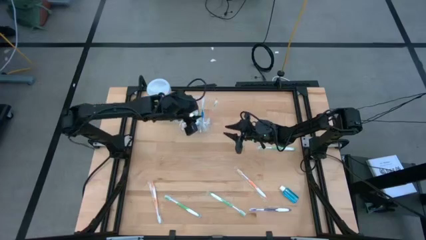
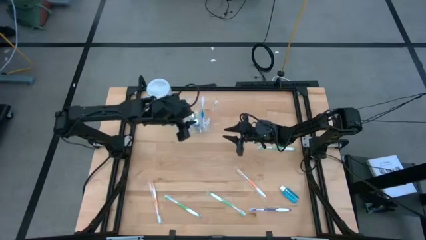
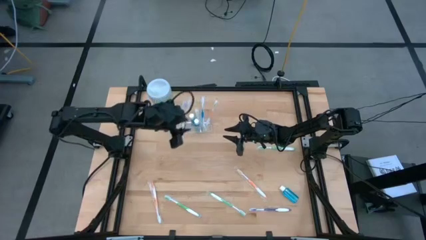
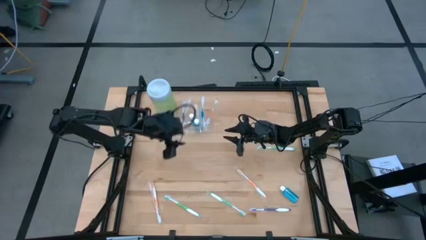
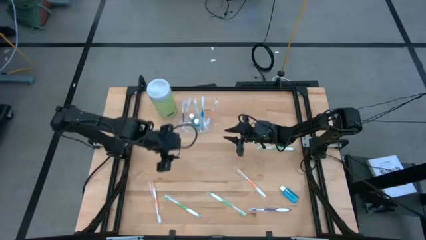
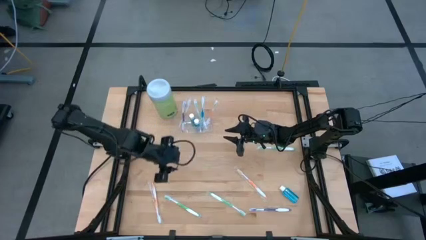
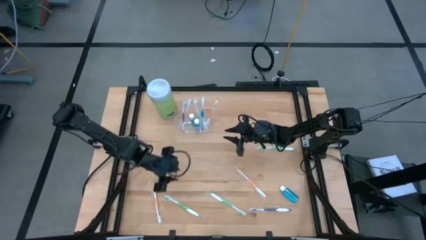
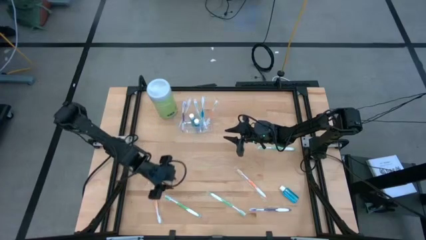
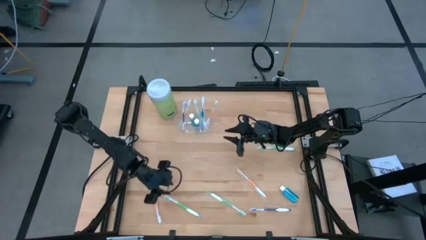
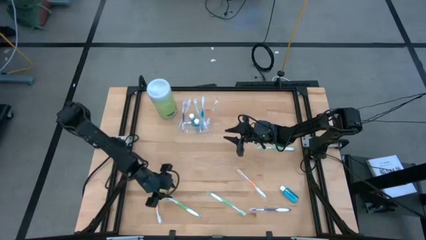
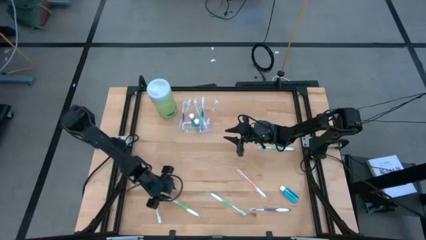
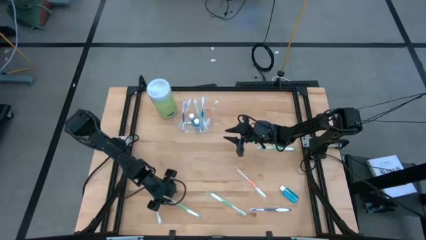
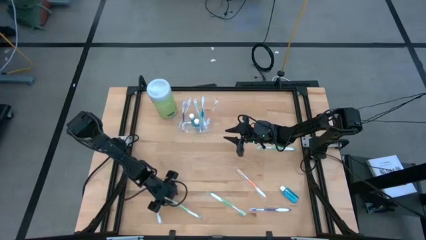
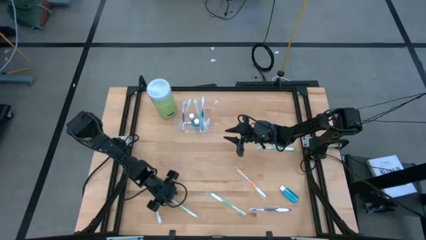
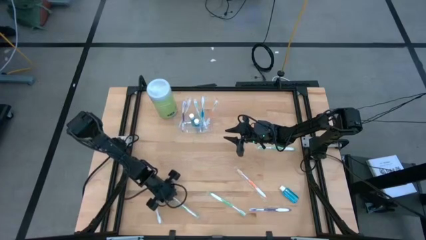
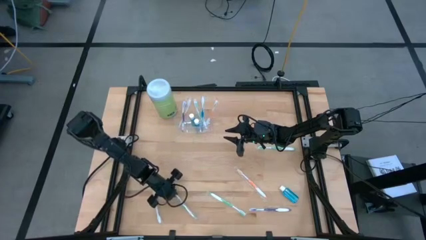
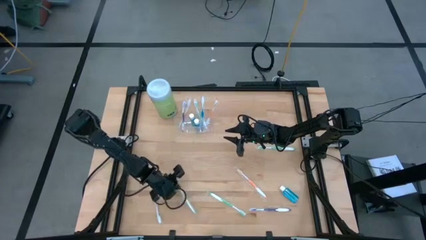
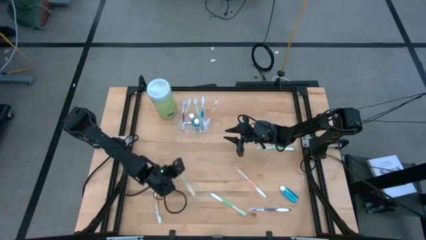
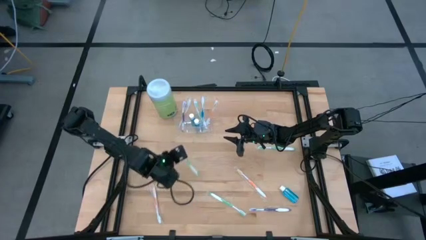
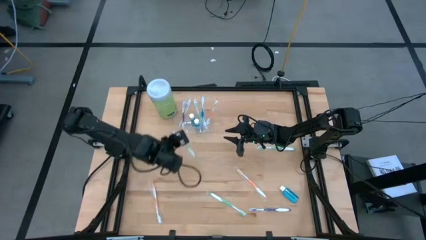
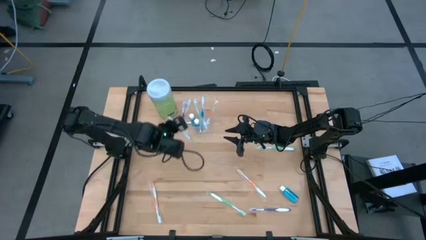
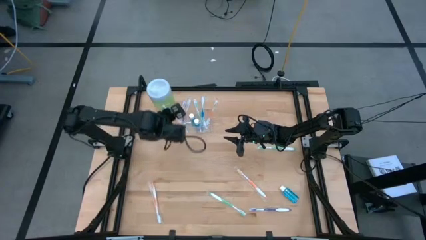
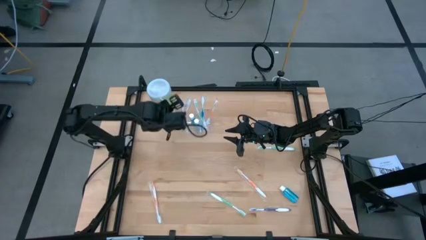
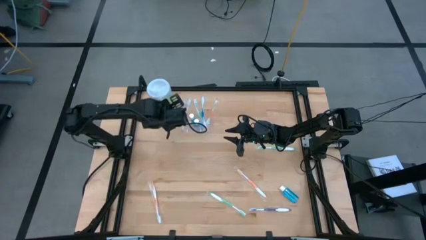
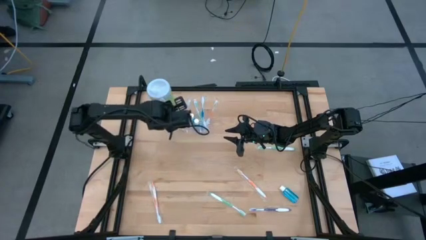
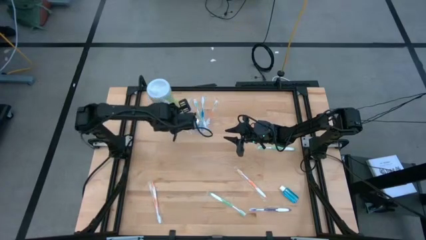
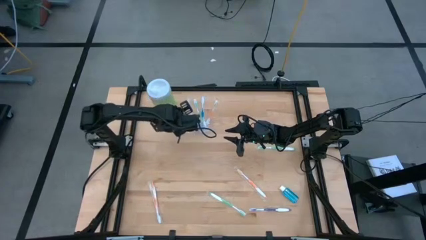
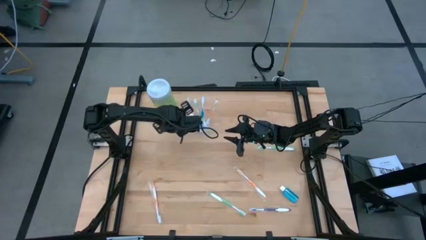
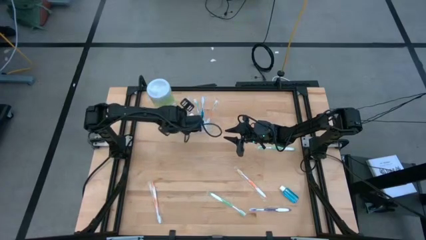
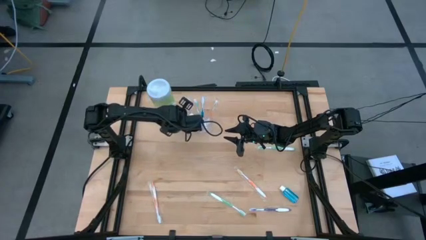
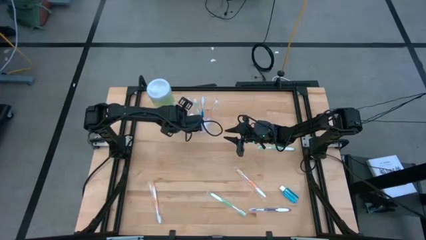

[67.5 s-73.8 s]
Task: Pick & Place toothbrushing station
Put the green toothbrush into the transparent organizer

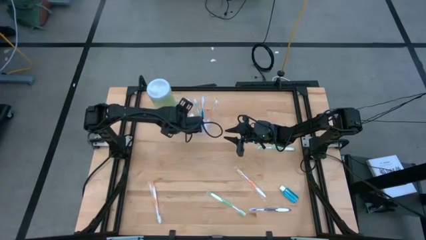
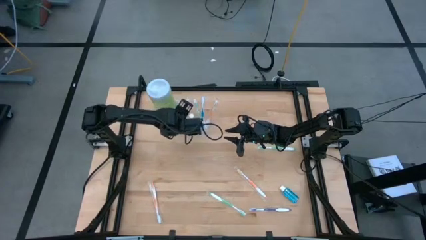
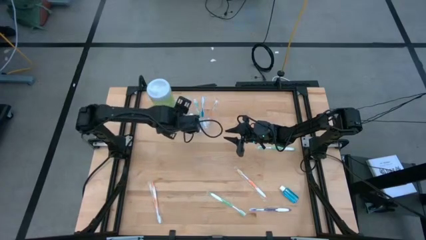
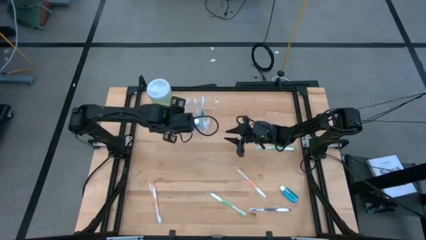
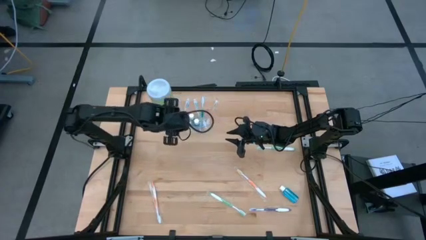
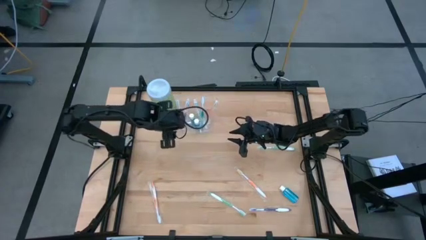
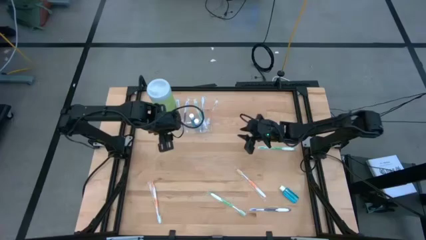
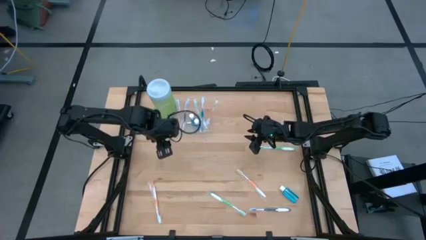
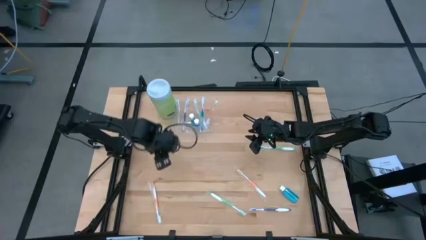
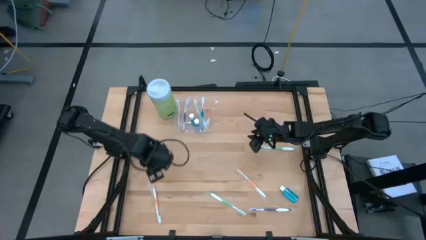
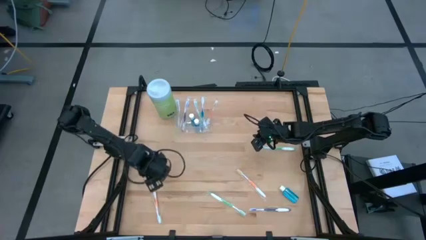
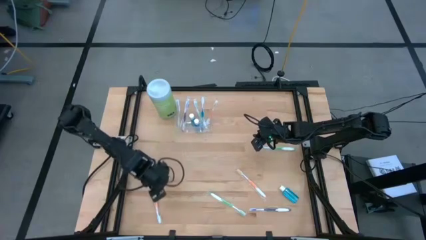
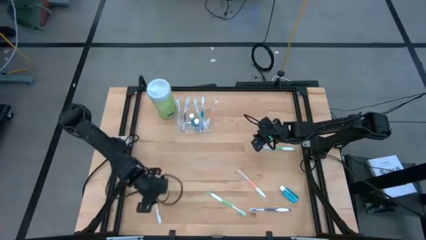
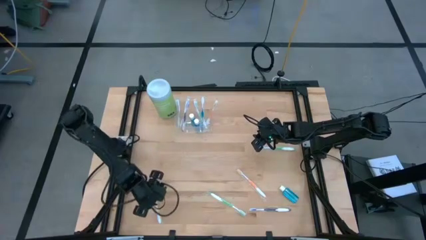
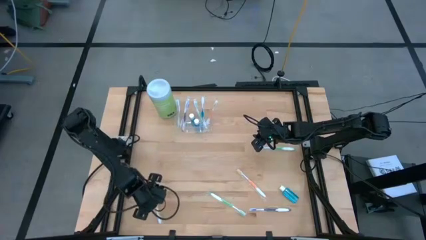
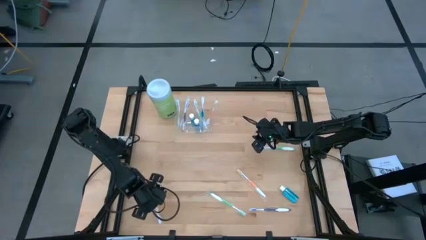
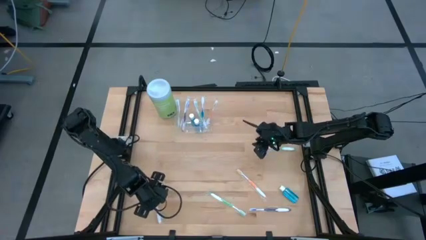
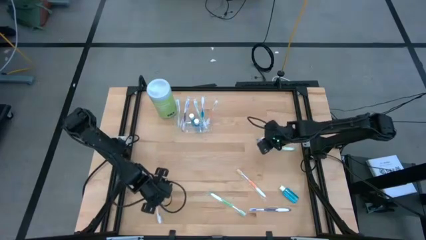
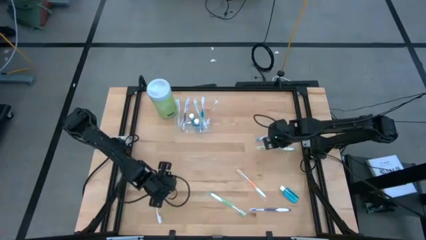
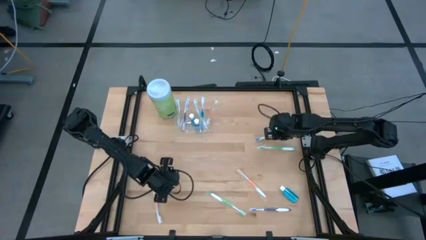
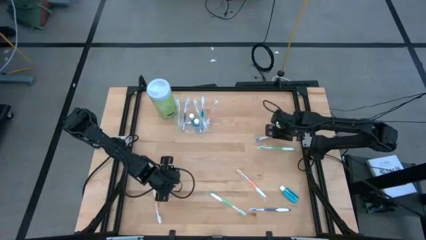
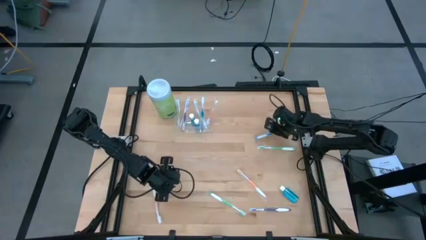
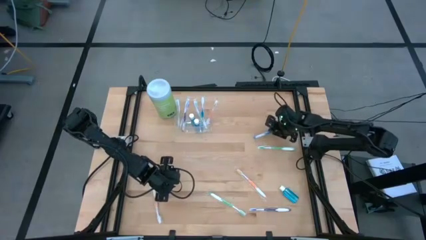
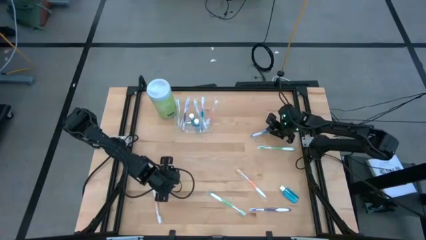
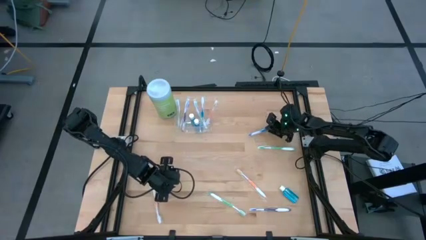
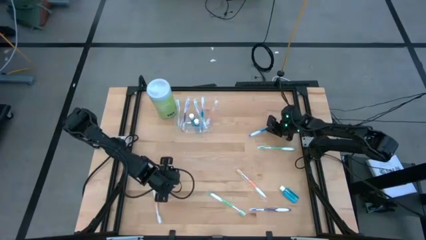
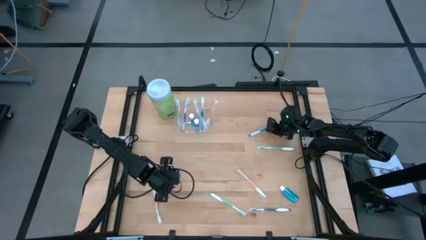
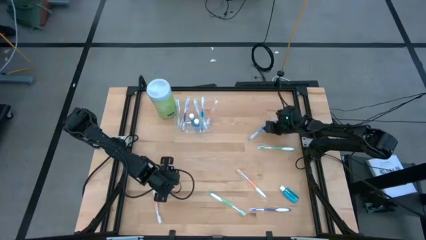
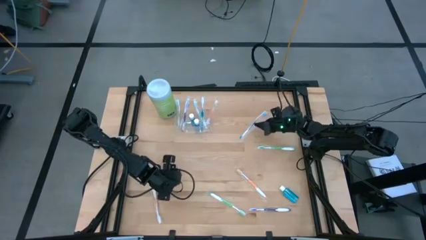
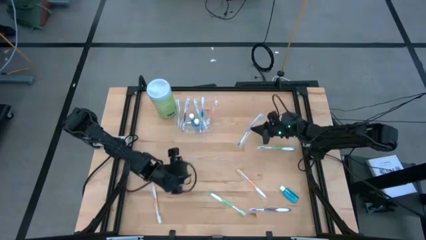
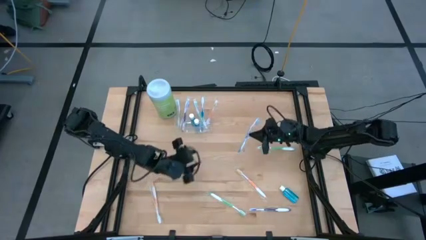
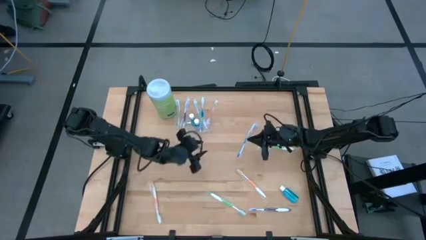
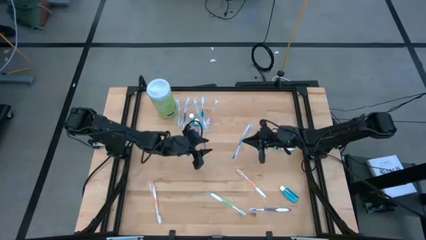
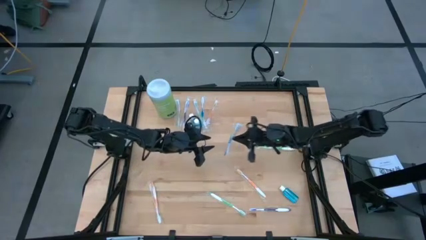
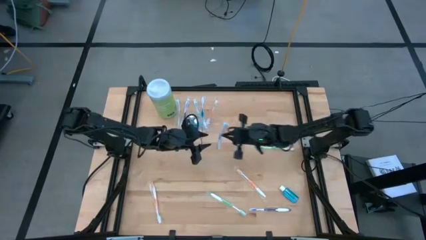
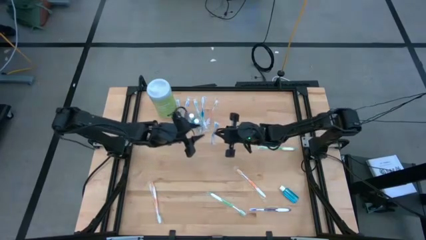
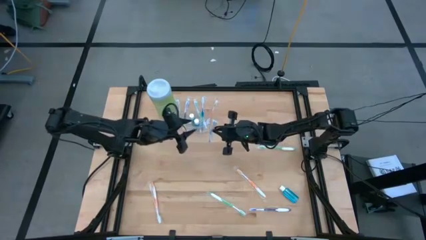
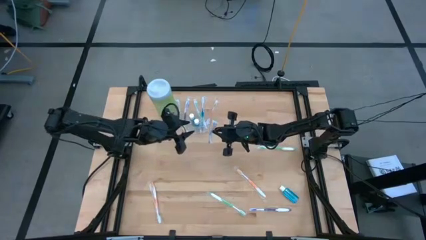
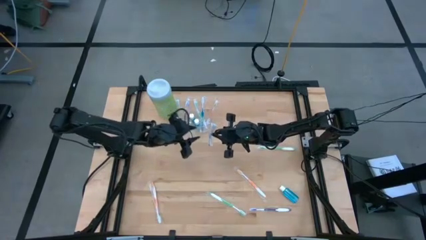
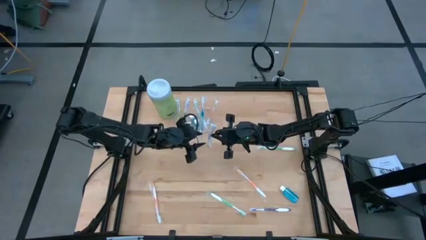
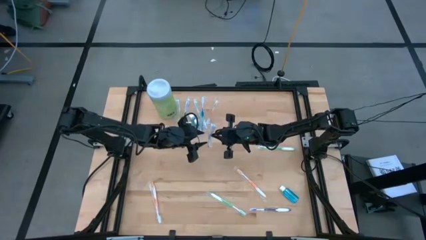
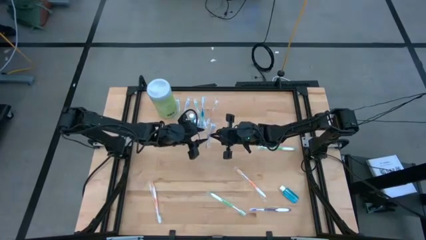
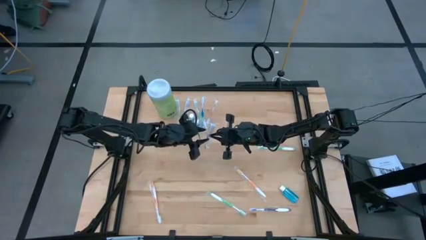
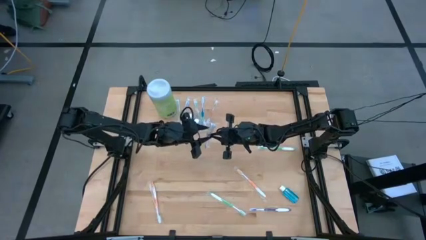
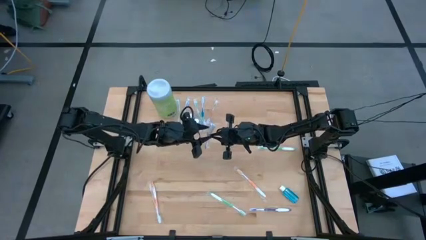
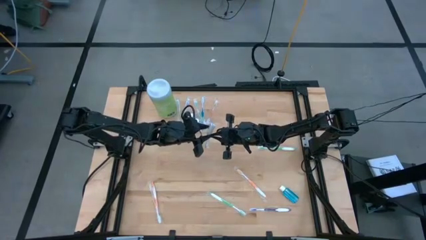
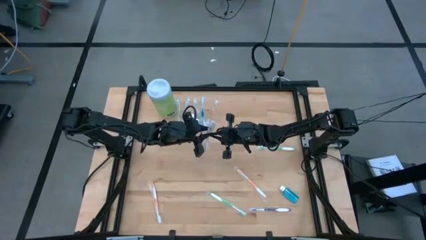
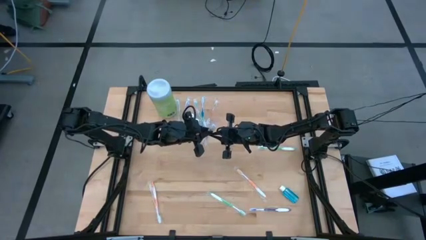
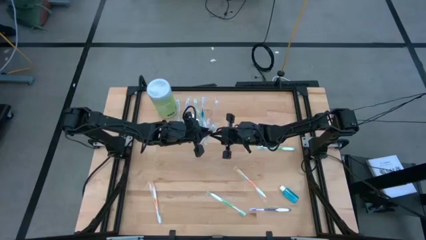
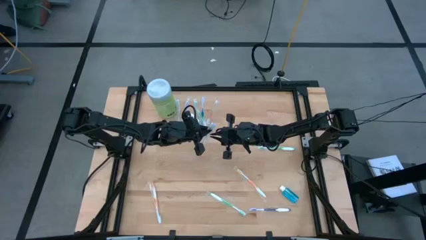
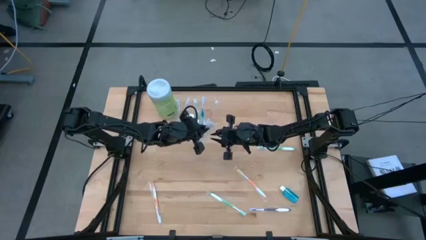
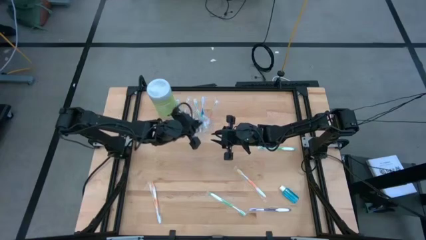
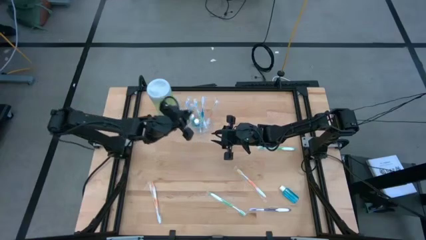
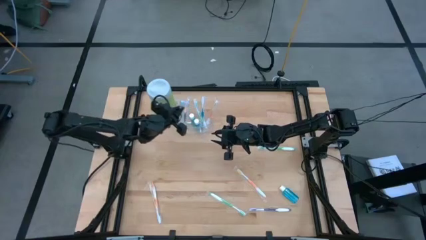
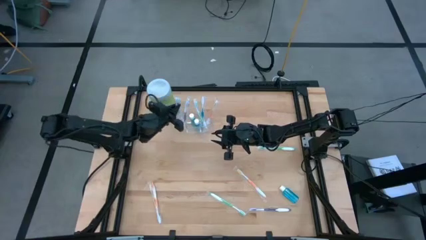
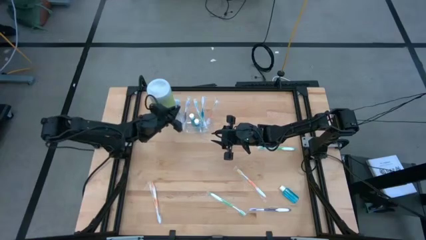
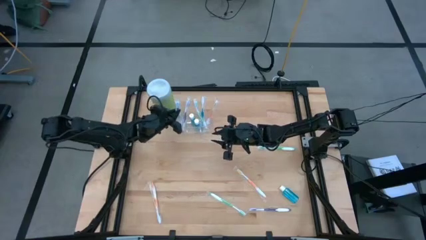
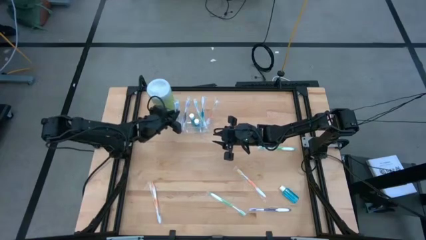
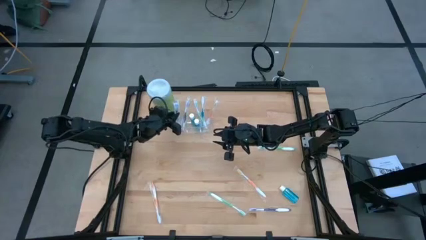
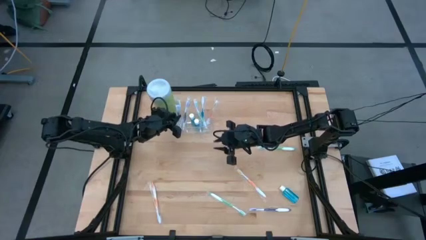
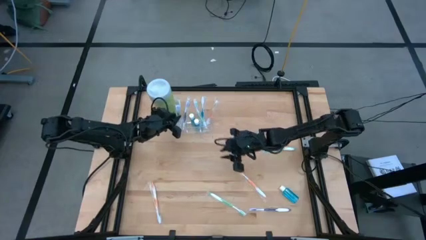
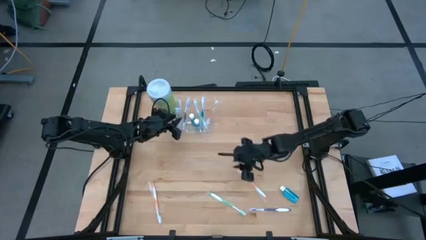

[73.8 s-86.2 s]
Put the blue toothbrush into the transparent organizer
